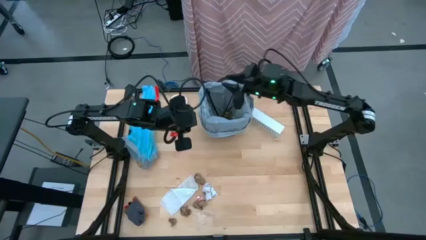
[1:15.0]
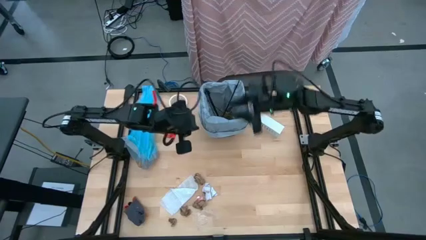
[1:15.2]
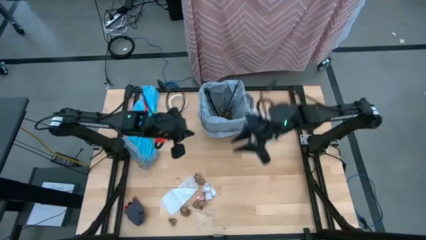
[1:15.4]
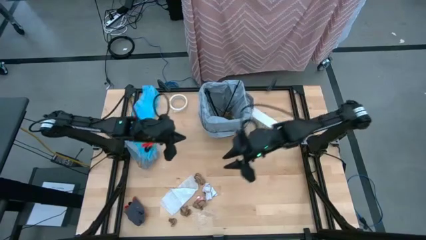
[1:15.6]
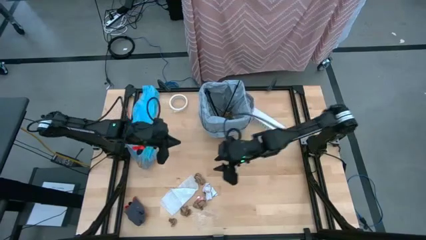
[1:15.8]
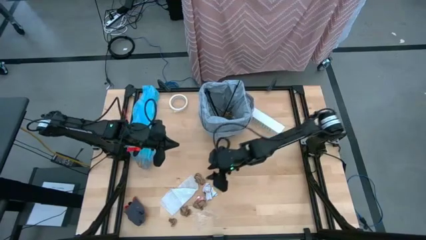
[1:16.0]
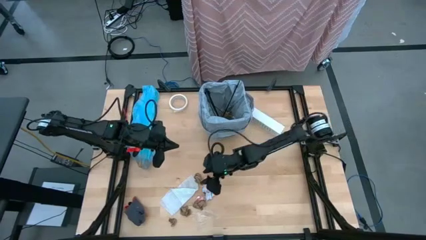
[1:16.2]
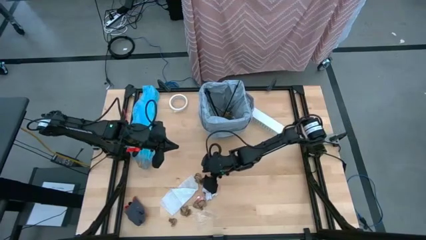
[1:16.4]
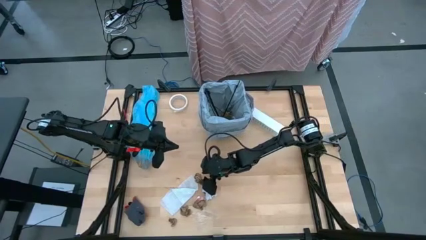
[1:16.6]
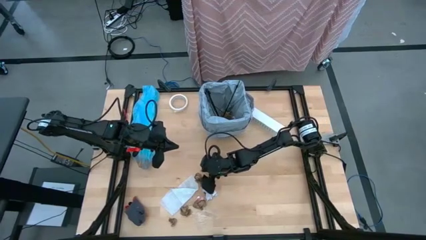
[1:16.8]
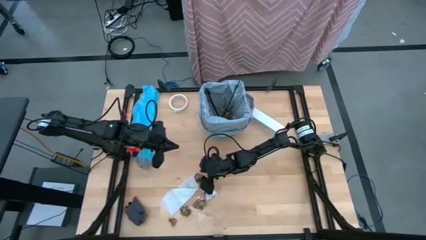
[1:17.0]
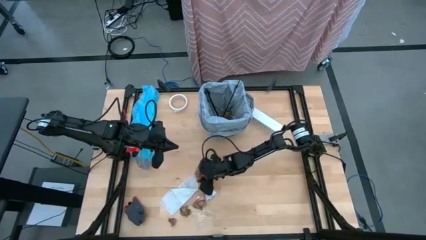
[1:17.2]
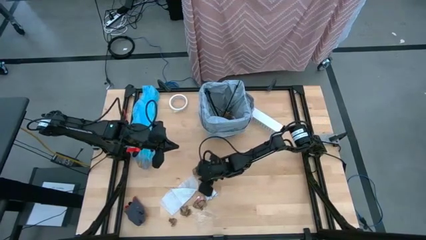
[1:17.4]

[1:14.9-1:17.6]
Task: place trash/remove bag and relplace
Put the brown napkin into the trash bin

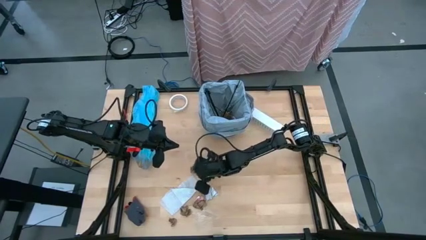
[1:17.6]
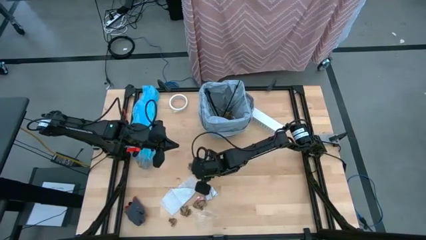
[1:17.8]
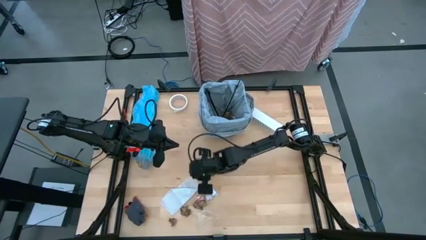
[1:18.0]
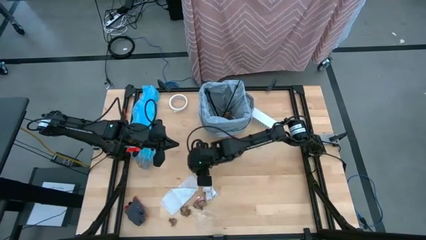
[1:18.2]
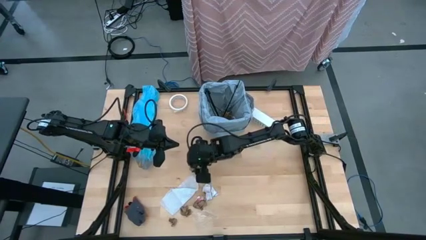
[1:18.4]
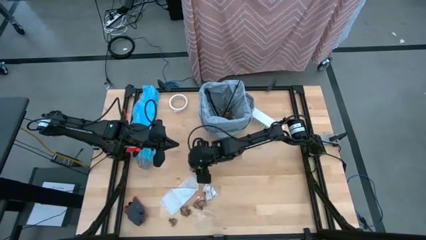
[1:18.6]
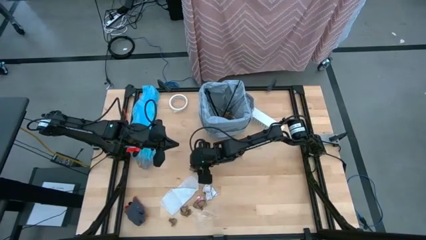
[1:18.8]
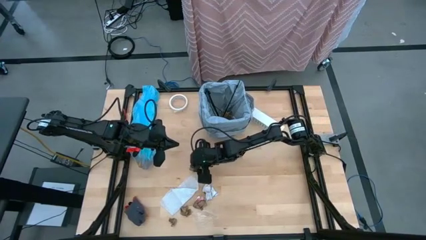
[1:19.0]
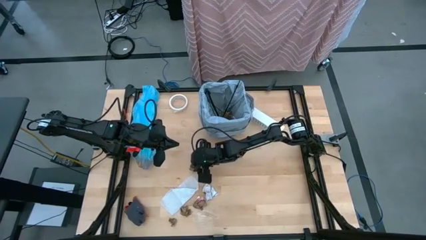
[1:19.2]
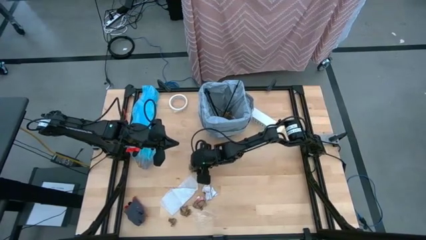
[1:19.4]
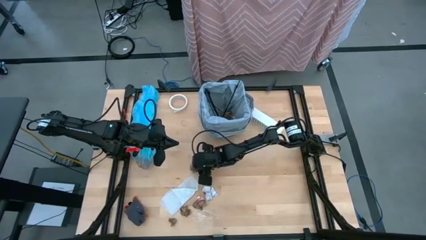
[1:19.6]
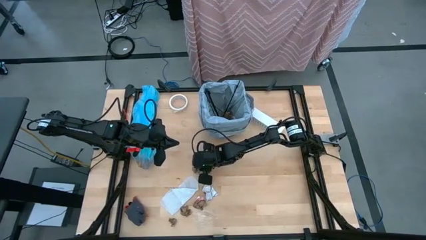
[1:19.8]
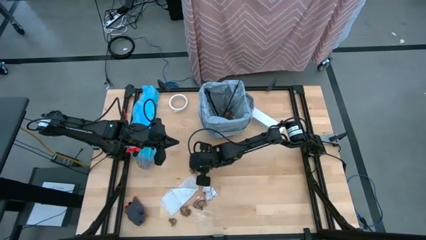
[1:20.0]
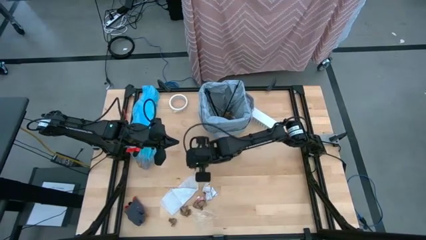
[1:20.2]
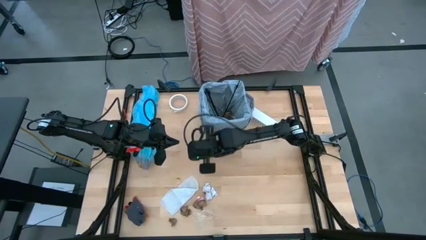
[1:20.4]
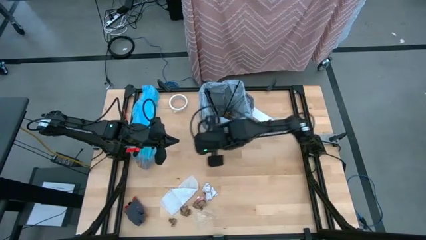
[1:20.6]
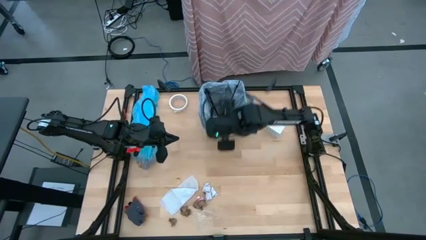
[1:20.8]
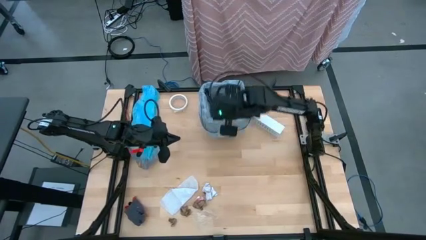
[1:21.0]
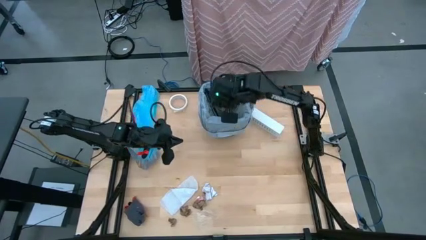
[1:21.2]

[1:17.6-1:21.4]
Put the brown napkin into the trash bin

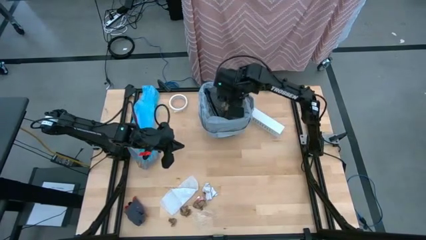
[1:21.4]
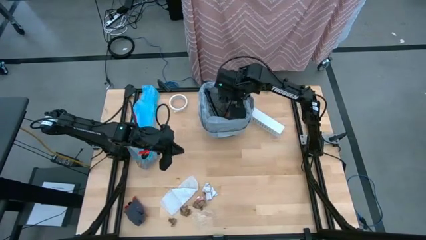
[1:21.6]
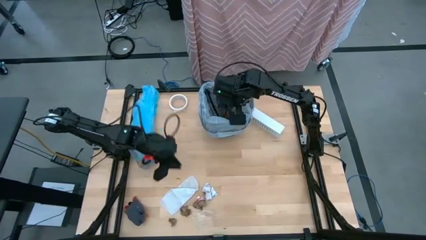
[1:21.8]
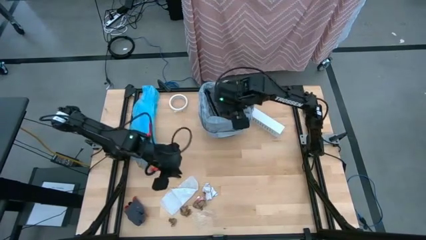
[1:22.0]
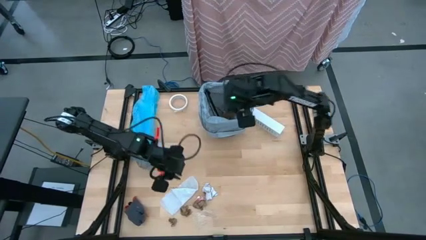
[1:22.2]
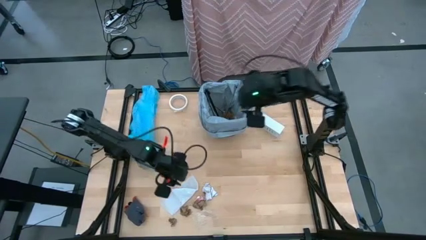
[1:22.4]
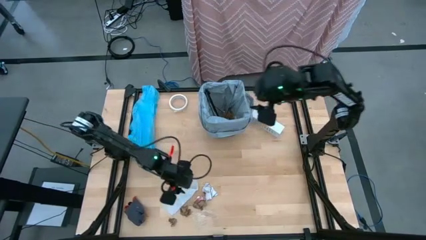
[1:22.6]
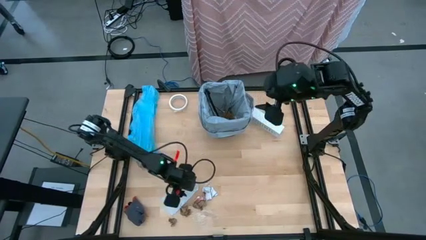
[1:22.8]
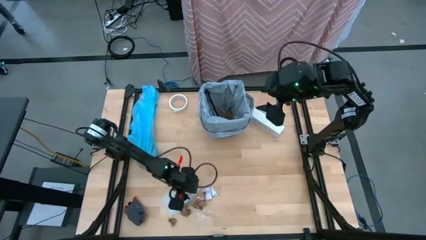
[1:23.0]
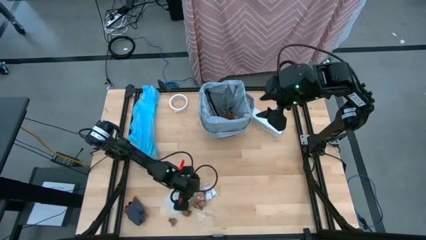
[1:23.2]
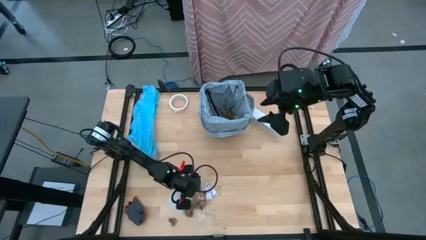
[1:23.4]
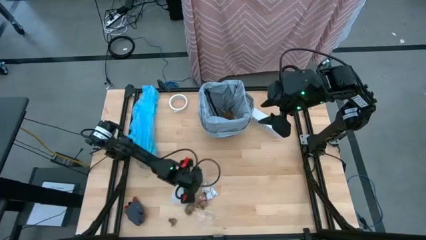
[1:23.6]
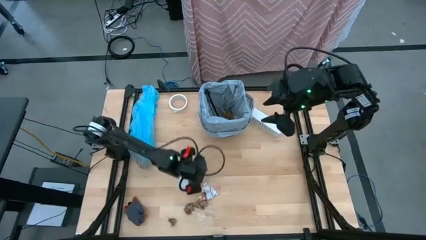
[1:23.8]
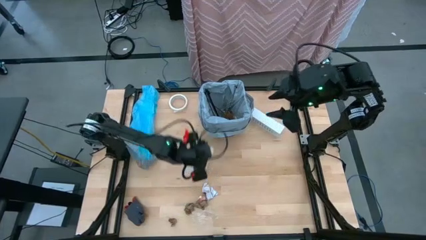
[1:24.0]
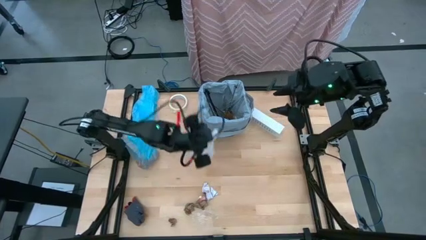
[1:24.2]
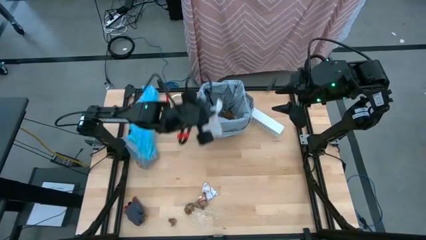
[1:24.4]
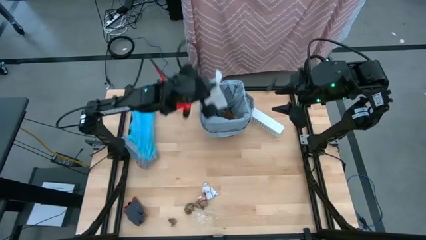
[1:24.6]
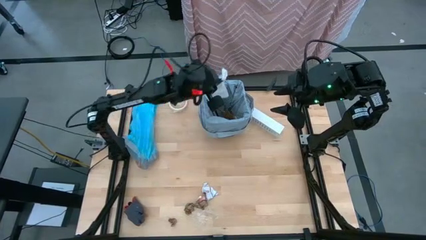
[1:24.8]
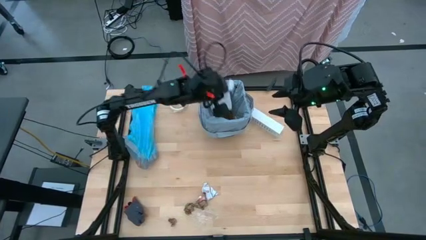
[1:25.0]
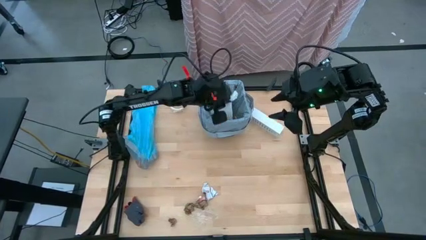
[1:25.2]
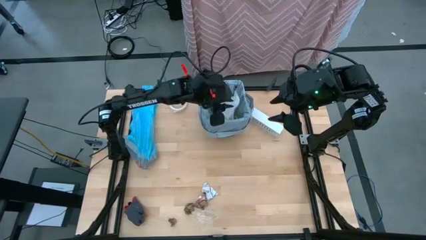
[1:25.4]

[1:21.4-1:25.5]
Put the white tissue into the trash bin

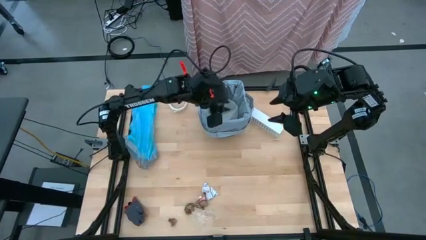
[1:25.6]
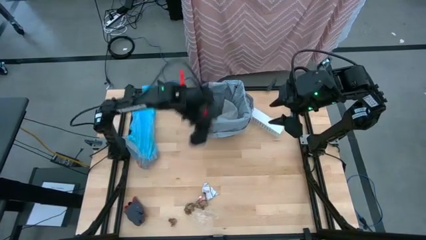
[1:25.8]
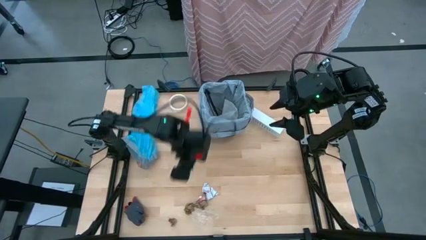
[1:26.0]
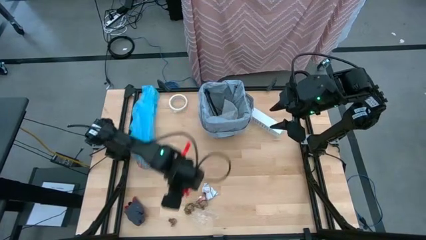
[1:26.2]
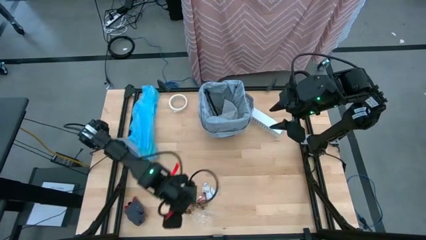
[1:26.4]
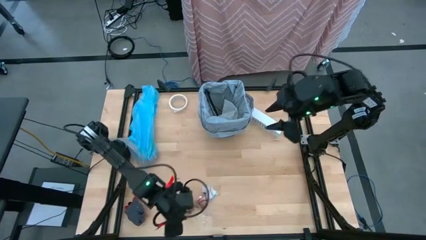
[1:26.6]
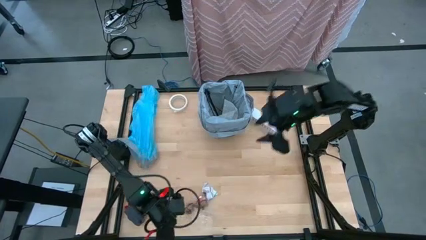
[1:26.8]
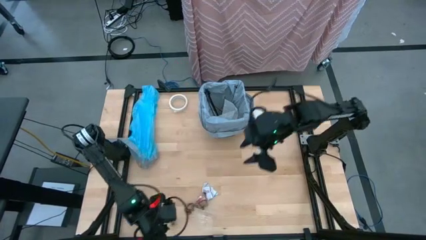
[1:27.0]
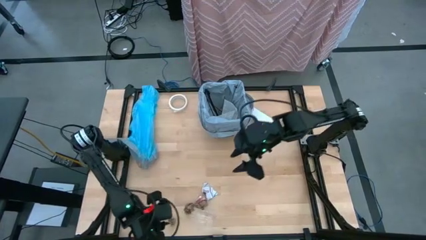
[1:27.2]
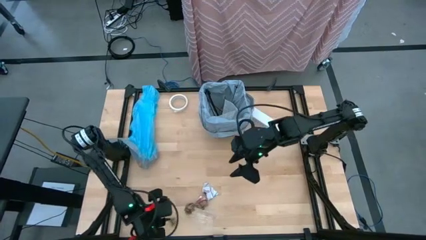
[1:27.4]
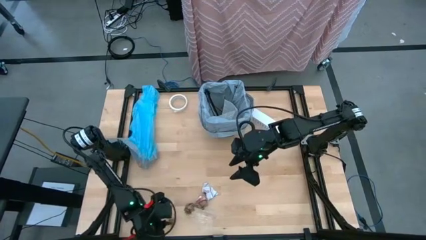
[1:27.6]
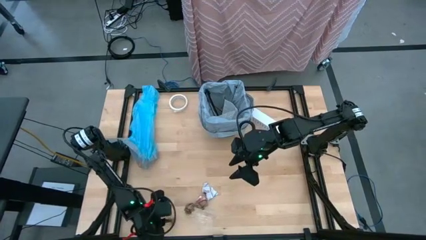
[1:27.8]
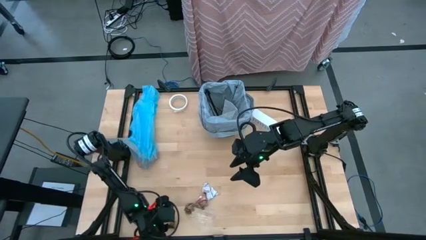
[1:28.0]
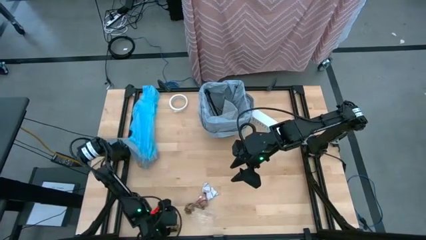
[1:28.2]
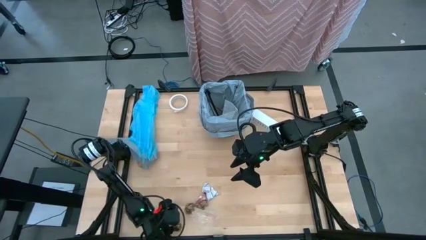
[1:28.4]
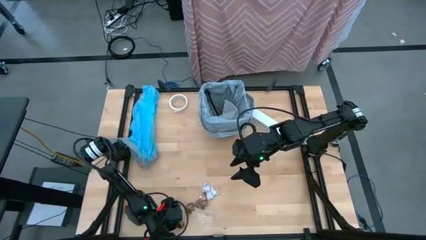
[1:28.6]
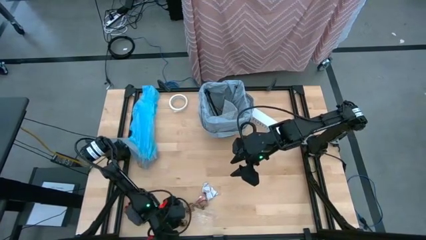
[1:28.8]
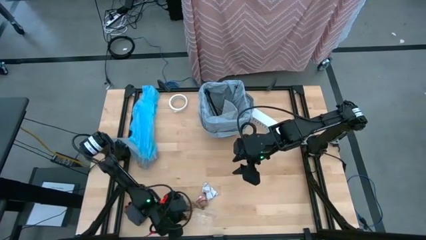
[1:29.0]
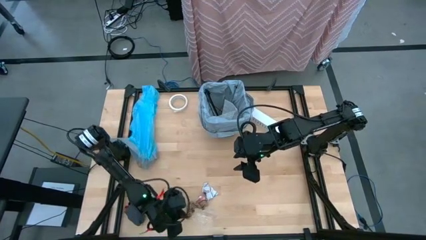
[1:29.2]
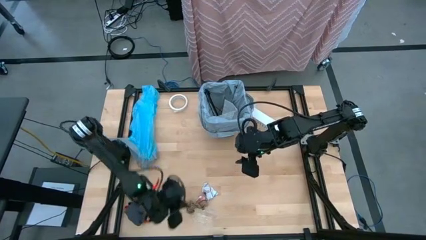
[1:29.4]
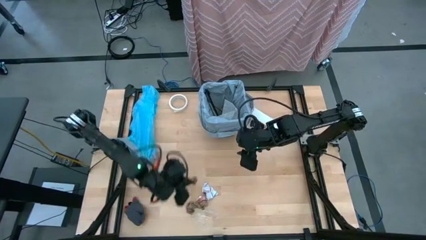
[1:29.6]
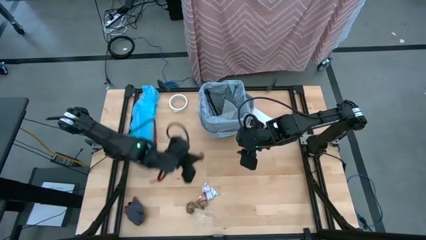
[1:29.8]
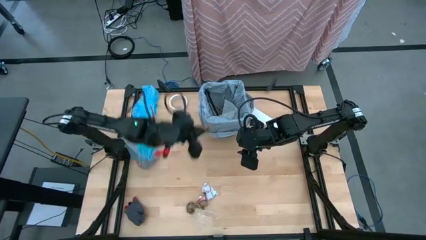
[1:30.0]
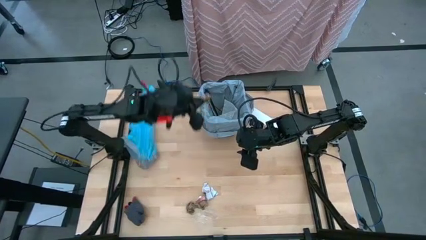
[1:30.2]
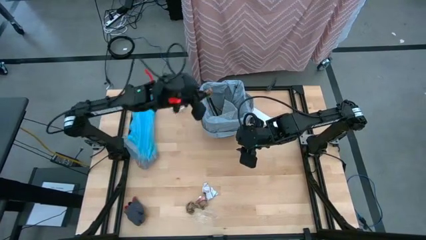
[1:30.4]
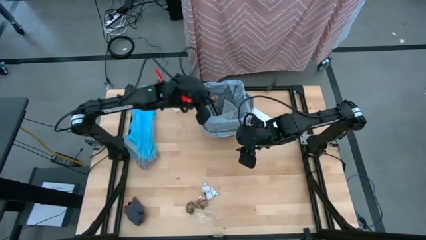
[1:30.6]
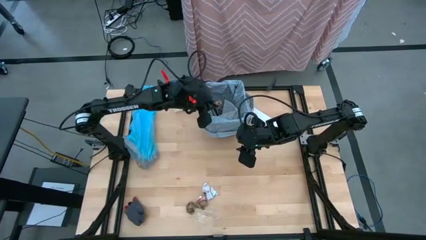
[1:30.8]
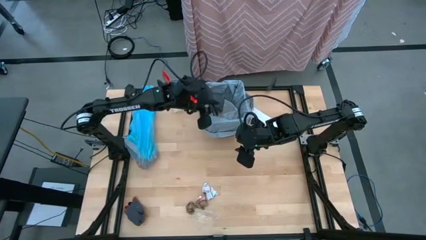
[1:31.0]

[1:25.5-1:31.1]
Put the brown napkin into the trash bin

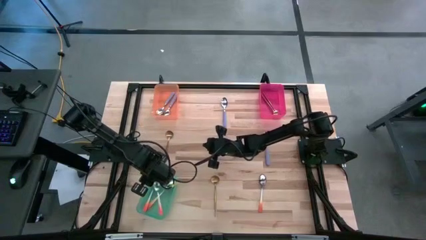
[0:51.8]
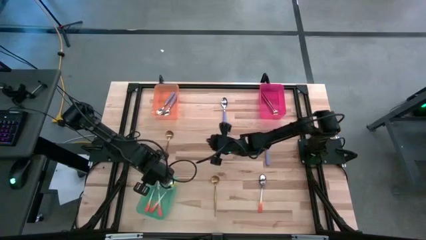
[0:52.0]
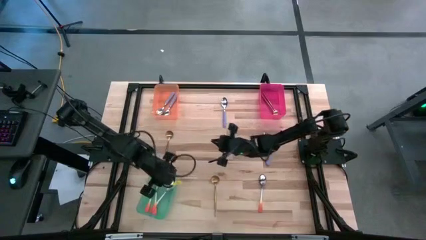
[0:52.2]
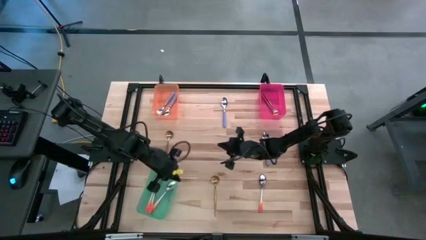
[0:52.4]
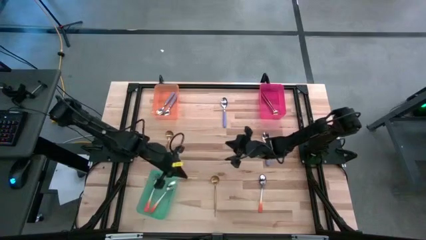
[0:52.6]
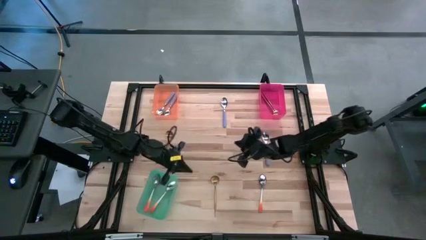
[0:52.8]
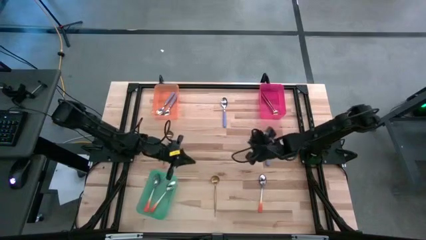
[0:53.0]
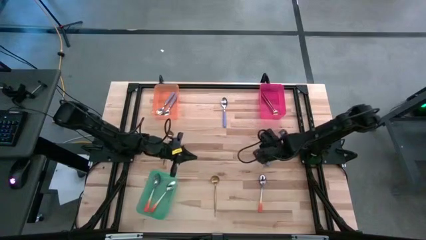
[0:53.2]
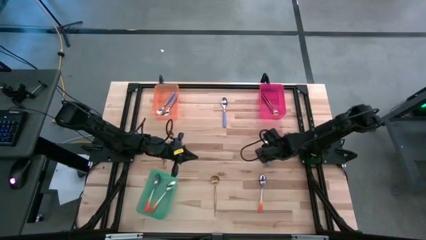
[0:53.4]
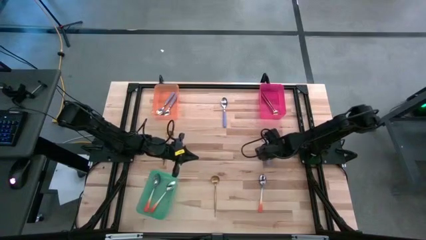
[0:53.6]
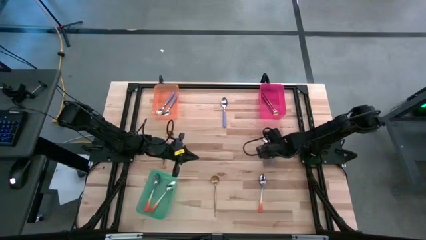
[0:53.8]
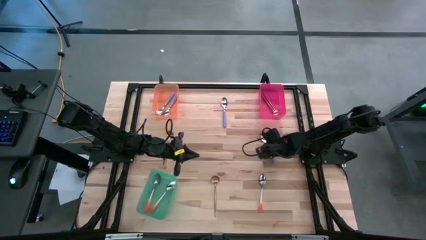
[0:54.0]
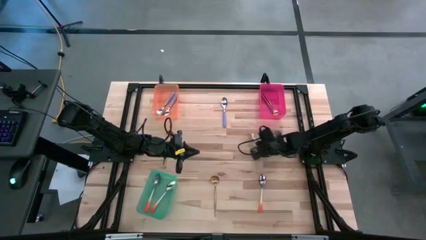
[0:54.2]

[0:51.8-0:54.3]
Task: Sort silverware by color (type)
Put the purple spoon into the orange bin
